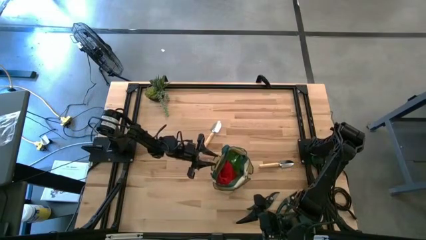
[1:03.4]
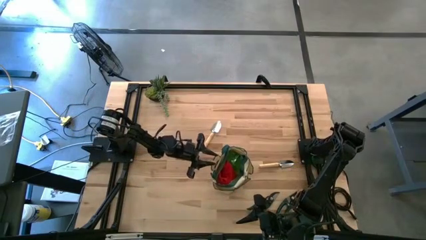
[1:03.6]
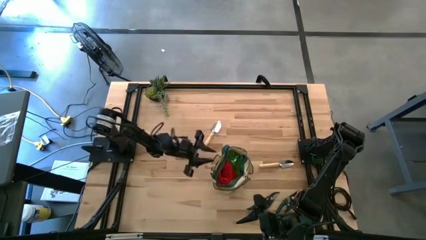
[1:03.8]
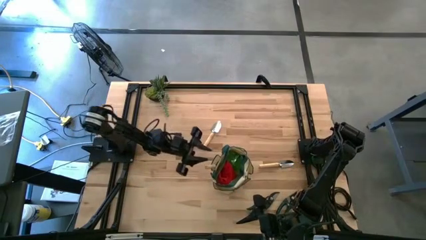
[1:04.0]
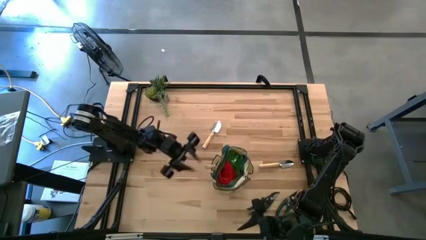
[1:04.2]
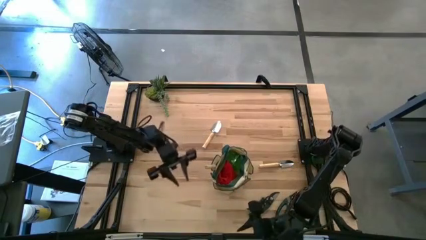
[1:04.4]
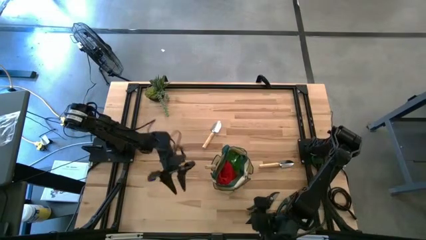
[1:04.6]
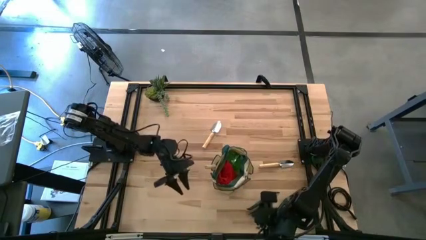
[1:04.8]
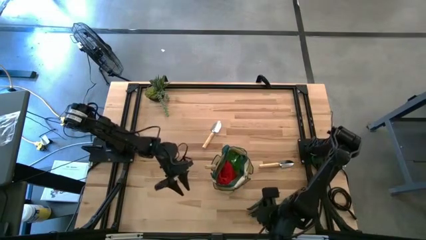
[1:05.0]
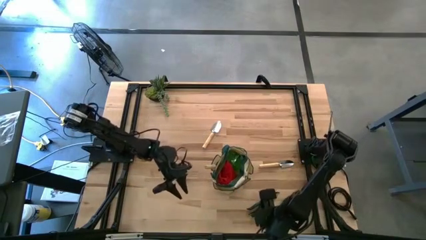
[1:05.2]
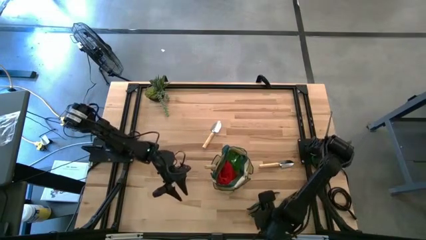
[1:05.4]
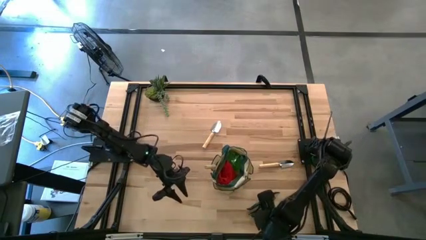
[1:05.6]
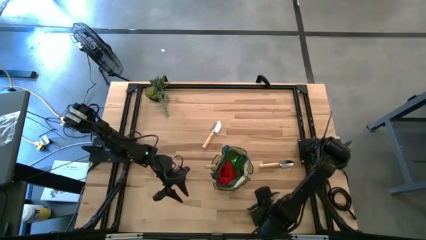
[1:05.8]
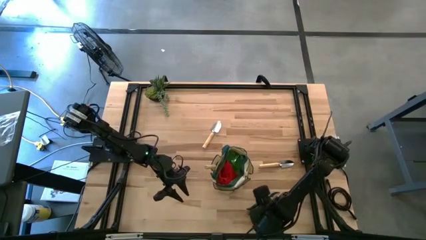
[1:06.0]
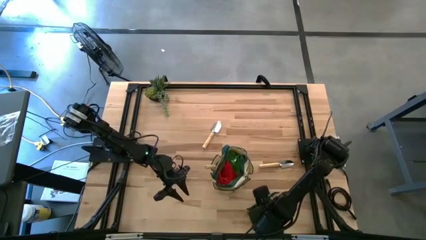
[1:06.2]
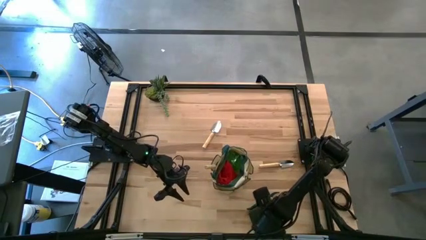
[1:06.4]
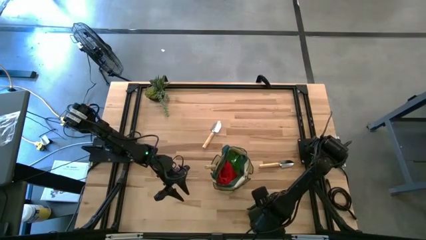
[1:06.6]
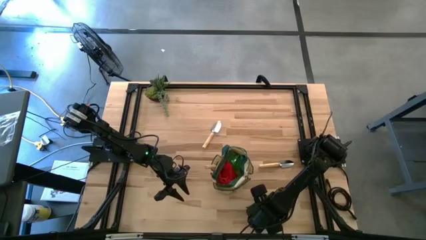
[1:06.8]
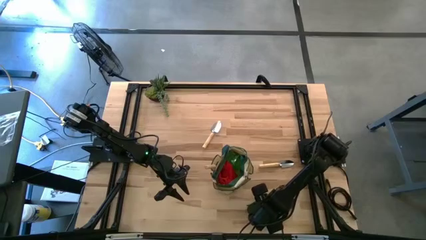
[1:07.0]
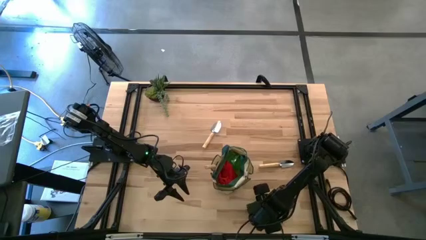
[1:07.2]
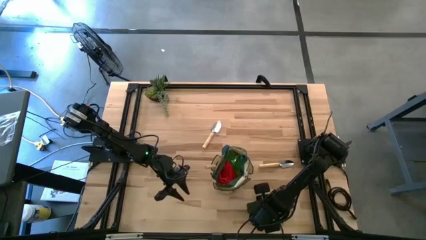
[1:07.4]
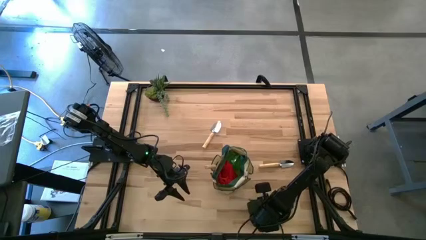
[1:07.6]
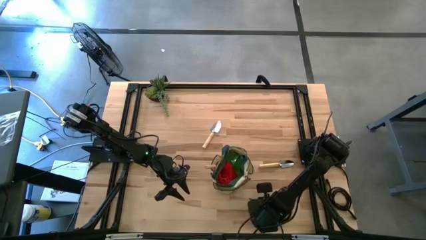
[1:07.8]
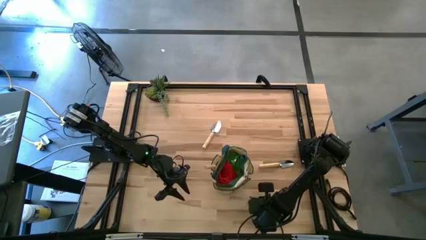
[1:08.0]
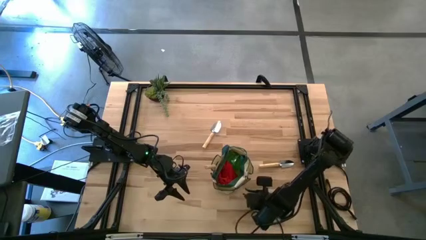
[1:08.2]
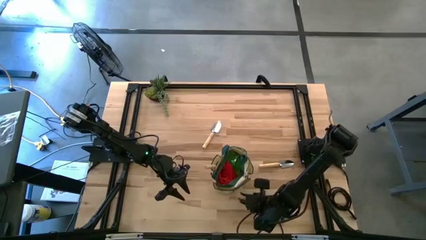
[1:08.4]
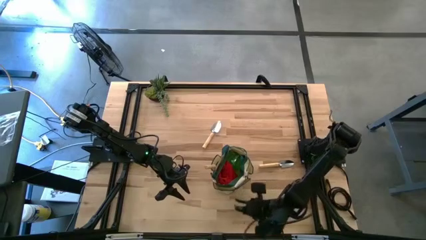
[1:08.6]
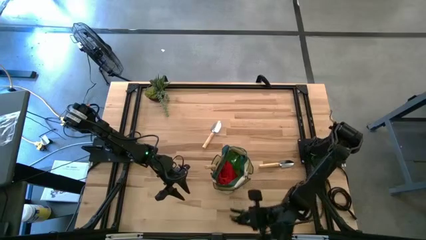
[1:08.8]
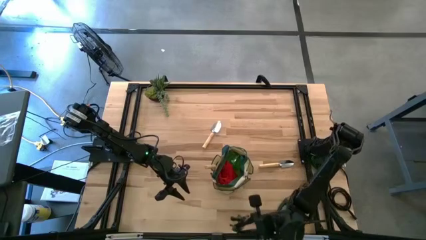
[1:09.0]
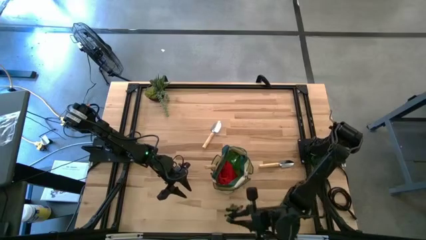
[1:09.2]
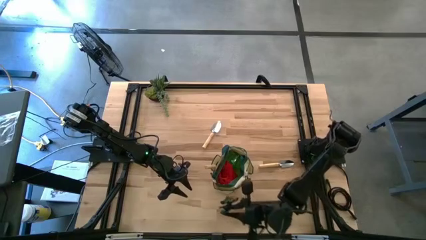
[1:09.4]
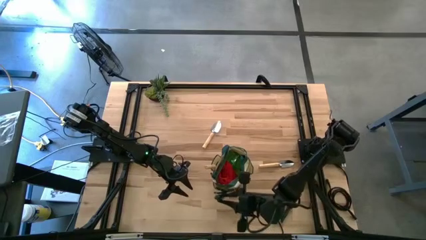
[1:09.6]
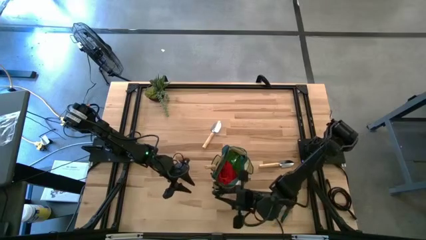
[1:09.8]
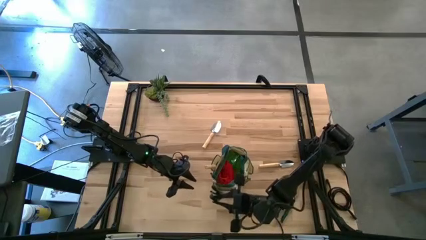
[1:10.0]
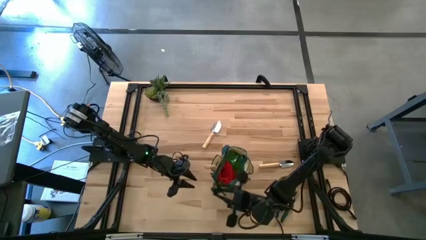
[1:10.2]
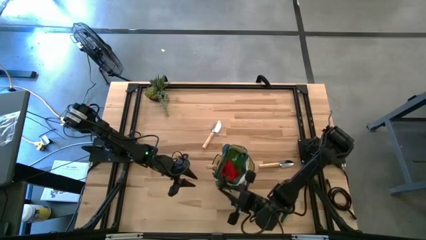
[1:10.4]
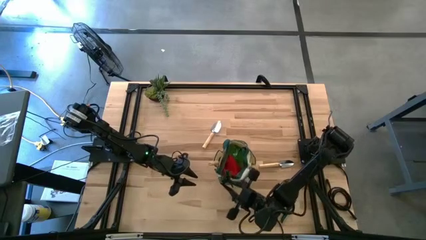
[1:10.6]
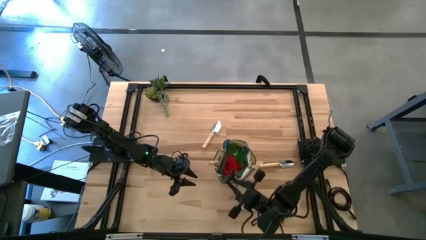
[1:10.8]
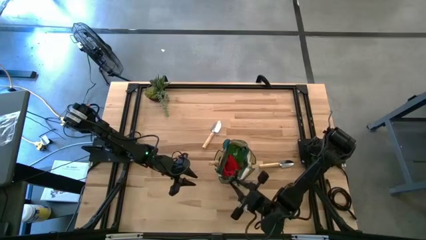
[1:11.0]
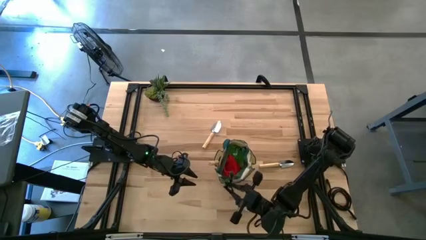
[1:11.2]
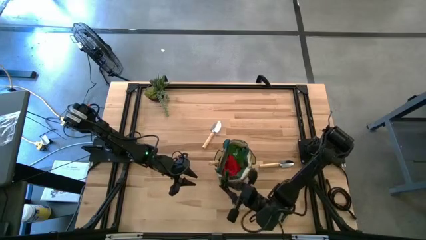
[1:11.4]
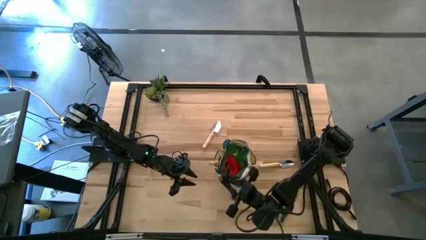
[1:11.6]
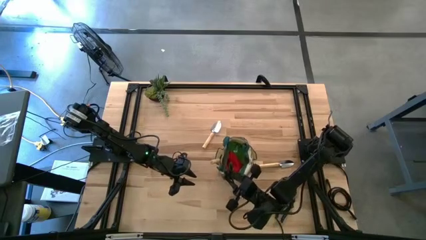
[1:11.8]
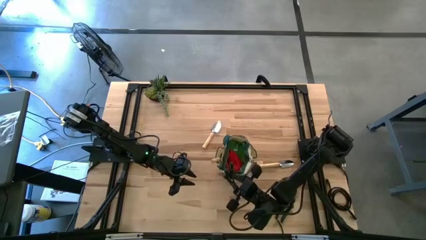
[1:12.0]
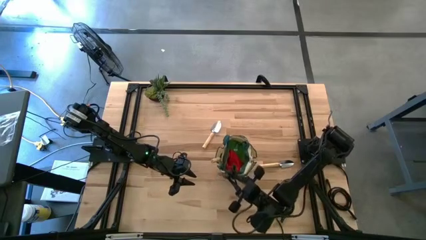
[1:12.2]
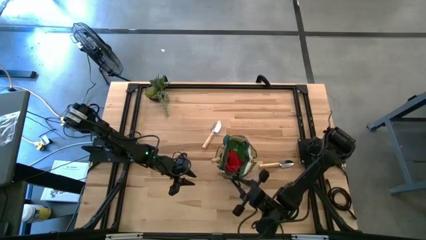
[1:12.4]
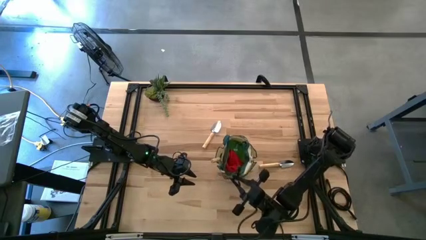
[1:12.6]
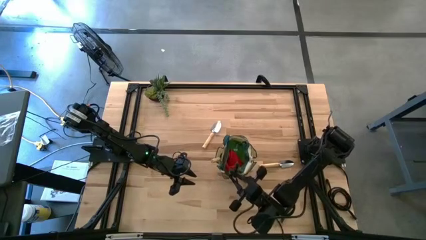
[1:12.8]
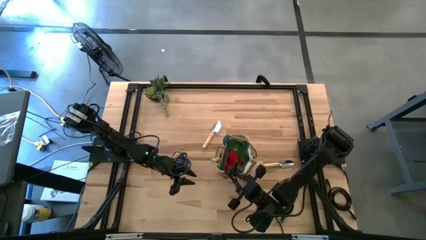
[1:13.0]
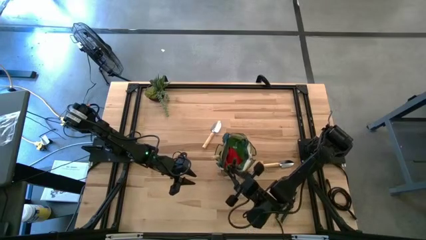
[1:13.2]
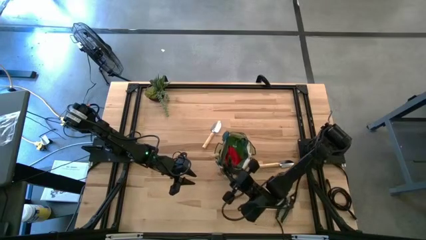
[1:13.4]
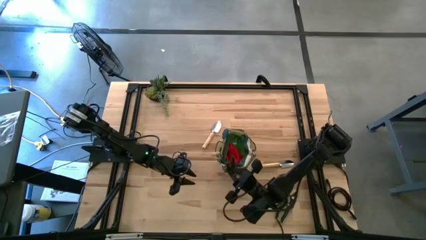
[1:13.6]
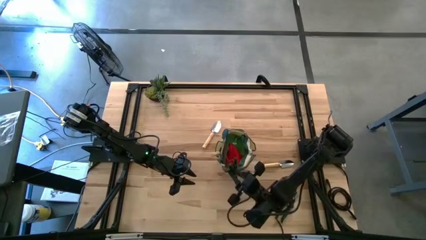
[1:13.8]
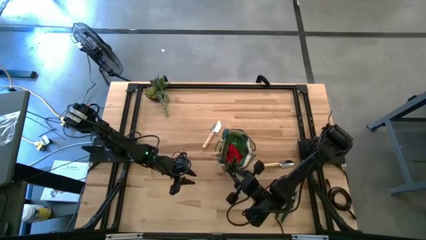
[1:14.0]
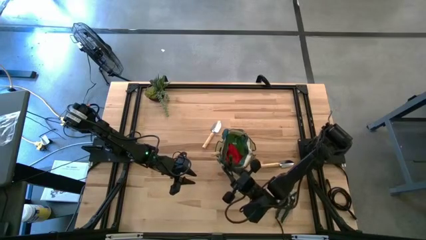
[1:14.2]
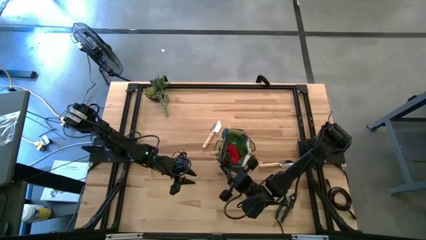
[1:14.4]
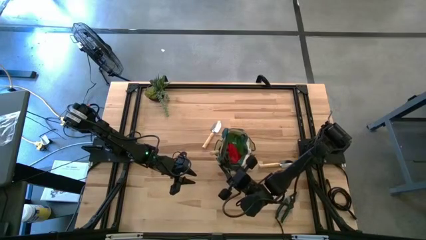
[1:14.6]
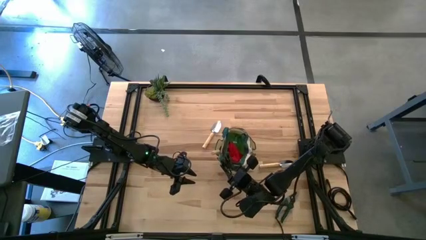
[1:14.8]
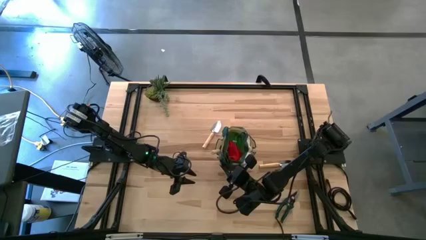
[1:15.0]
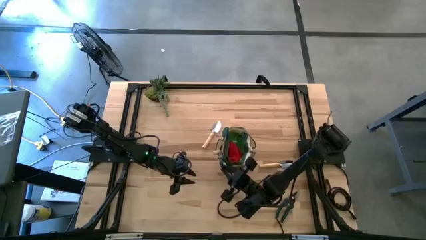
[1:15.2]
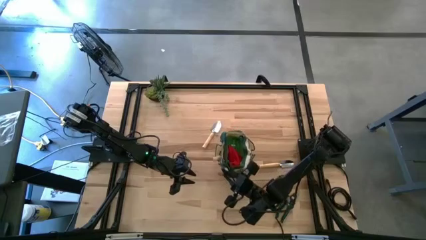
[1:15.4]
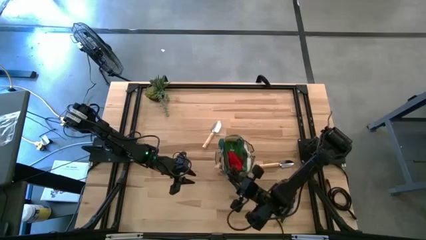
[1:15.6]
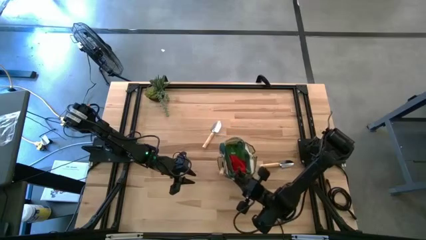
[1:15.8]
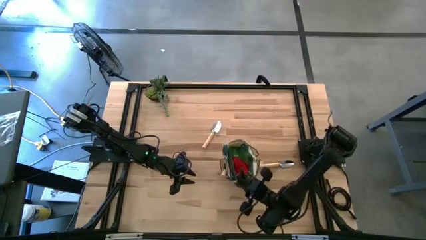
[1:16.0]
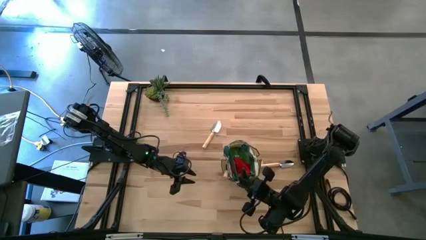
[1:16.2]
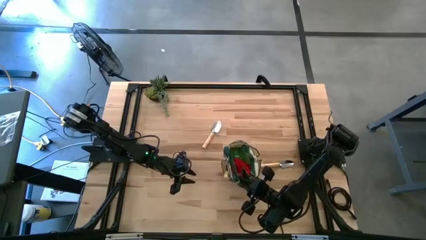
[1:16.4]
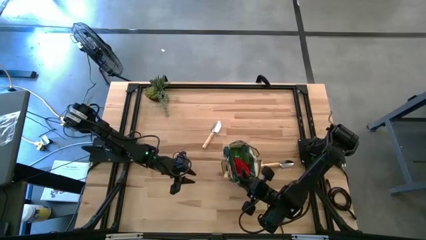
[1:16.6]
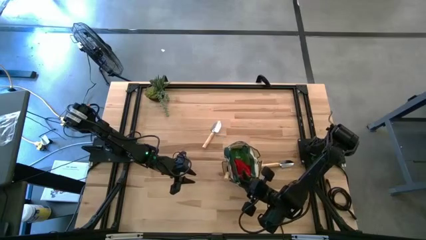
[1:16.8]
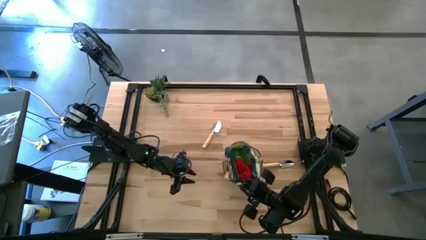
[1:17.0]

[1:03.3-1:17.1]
Task: Pick & Place Garden tools in Gardening bag
Put the left green shear scissors into the light brown gardening bag

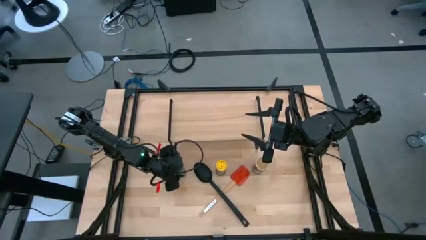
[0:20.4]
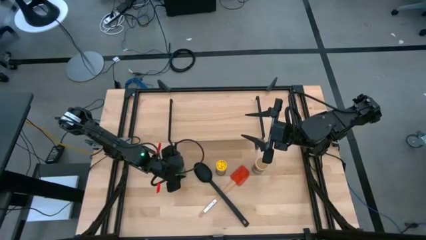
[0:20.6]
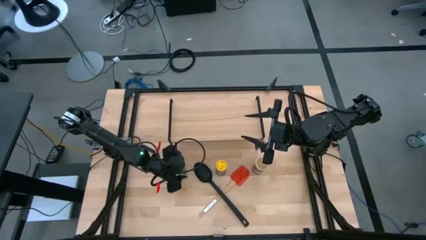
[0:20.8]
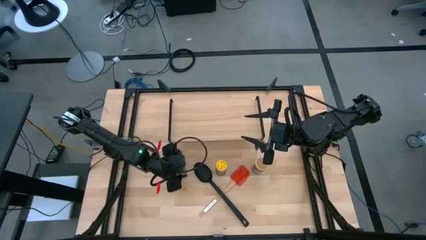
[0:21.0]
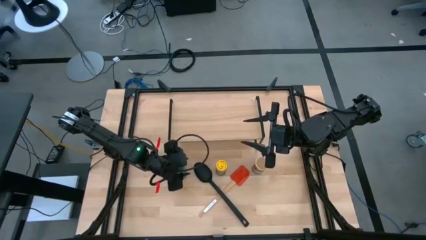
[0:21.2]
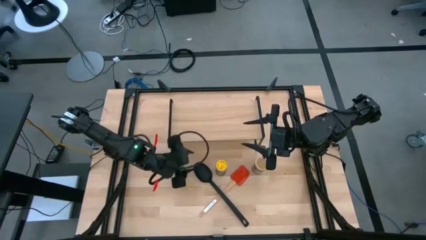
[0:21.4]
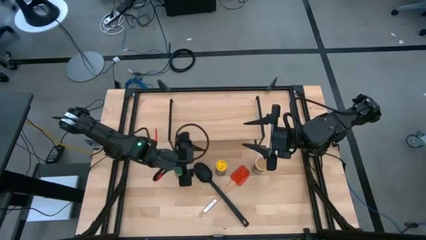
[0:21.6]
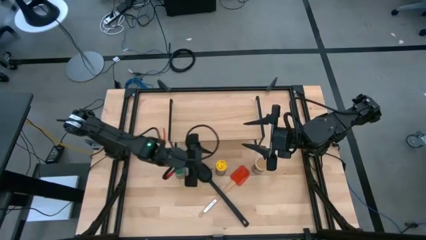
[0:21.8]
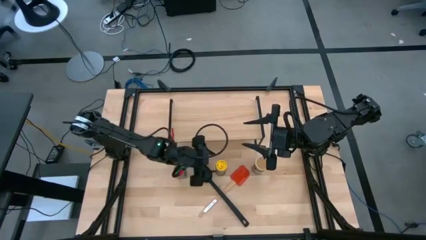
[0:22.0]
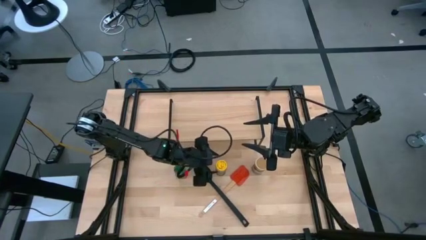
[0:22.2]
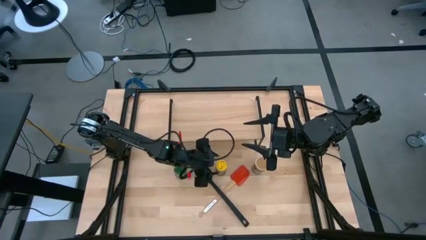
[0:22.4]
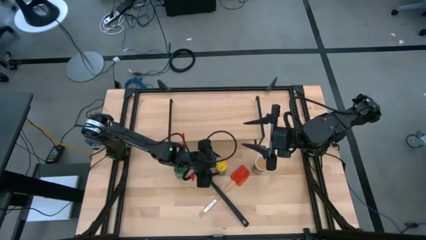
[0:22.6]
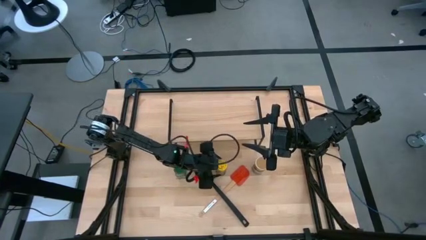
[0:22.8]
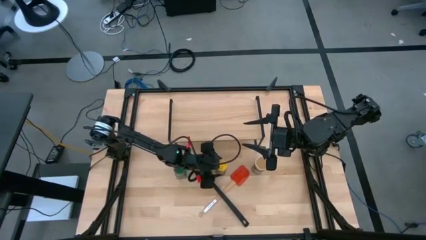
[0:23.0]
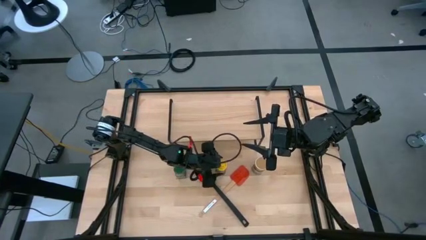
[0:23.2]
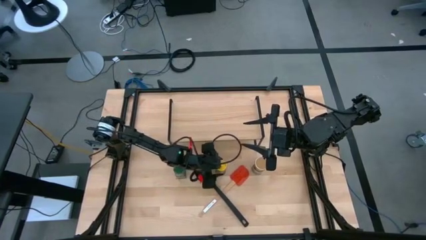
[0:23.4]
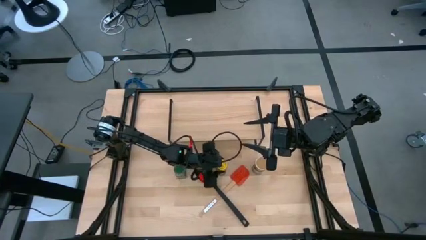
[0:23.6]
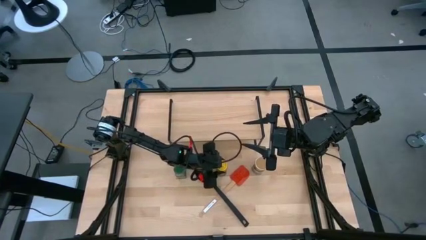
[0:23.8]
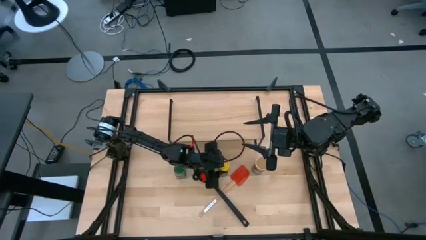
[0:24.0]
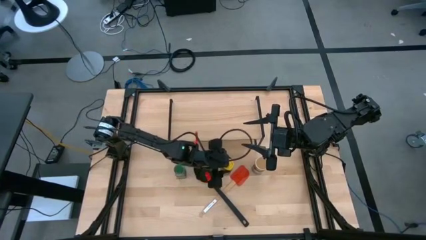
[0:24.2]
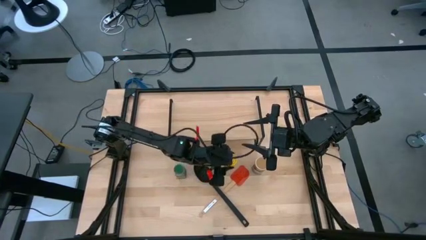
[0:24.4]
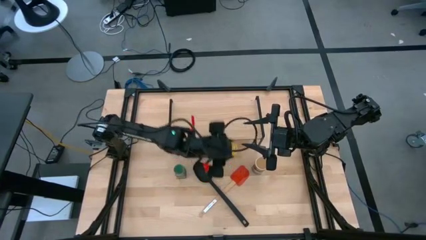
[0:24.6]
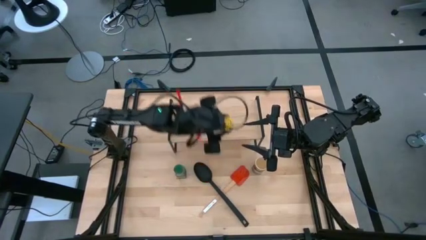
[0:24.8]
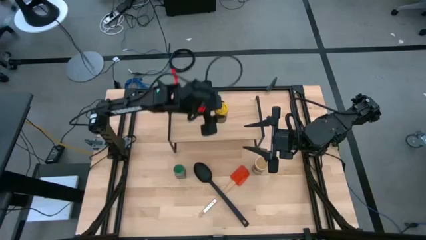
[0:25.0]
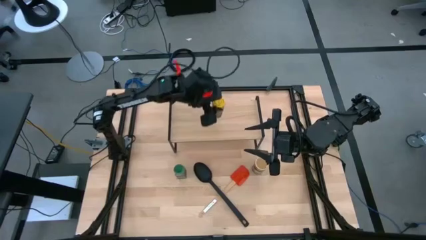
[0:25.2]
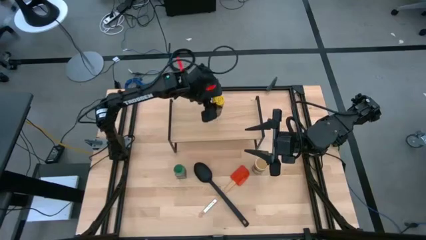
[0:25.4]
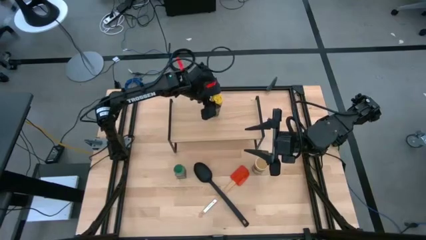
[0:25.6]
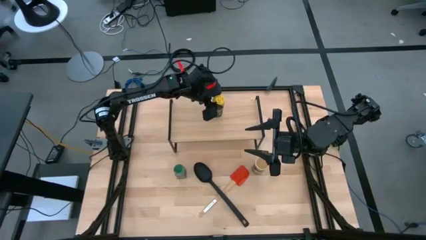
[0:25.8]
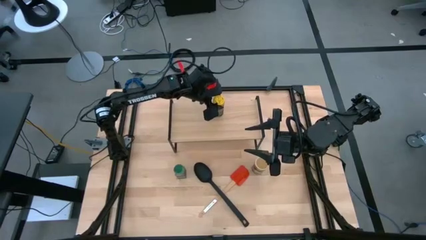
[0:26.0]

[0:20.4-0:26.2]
Task: Shelf spices
Put the yellow seasoning bottle on the shelf
